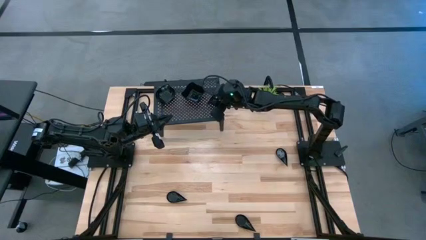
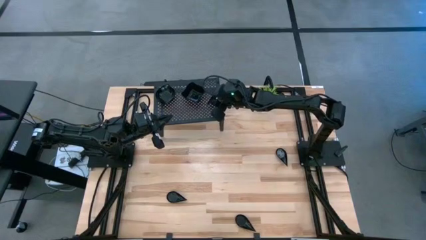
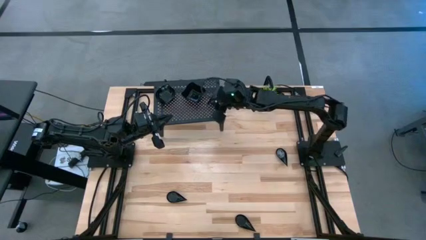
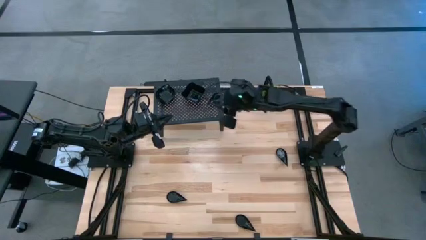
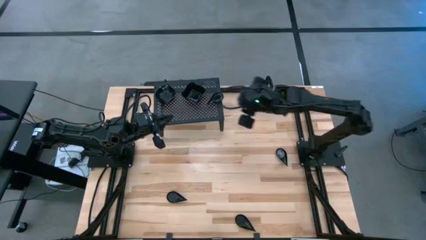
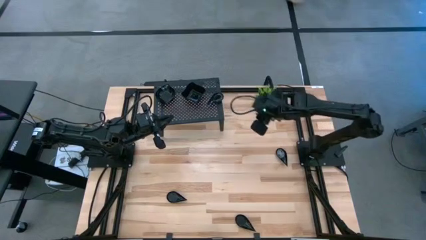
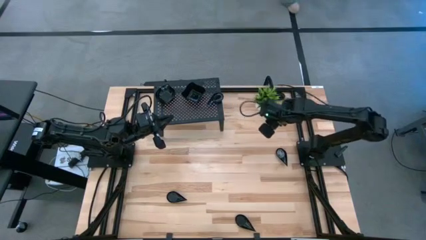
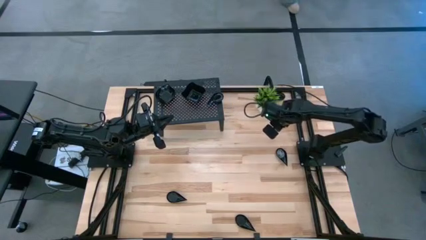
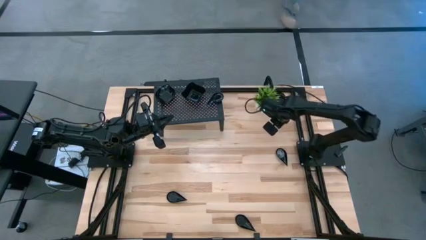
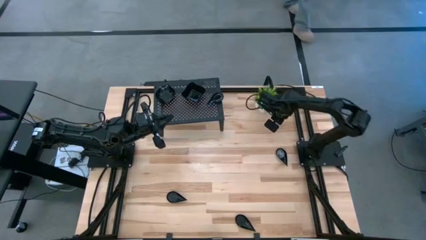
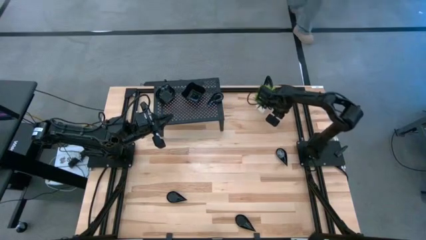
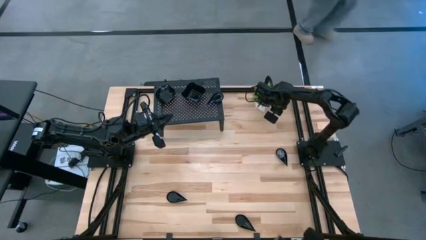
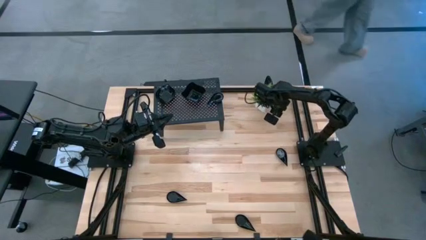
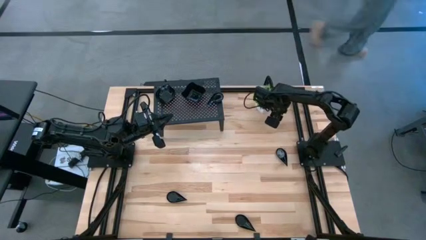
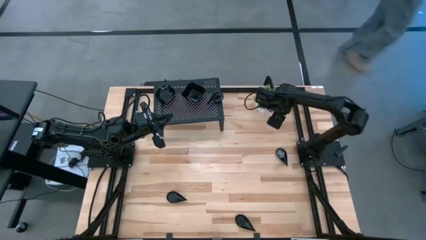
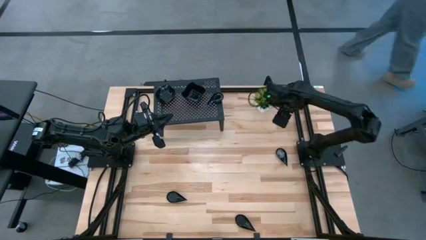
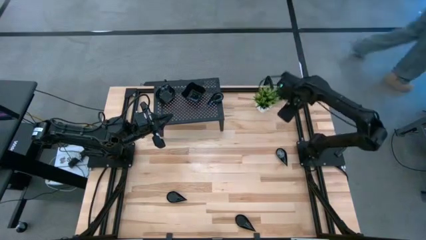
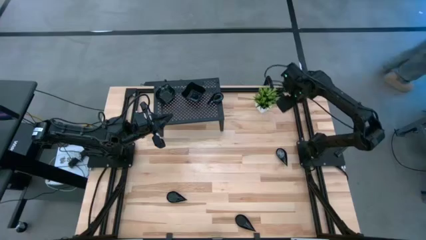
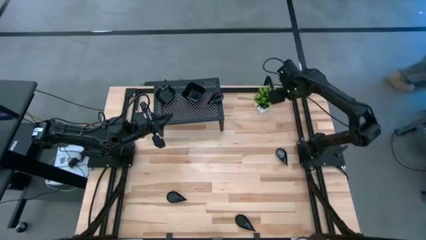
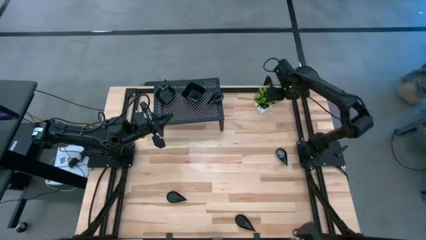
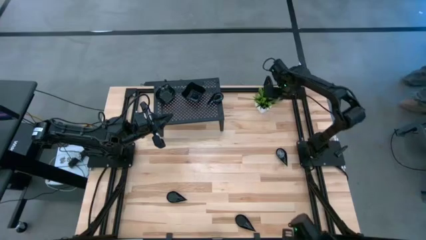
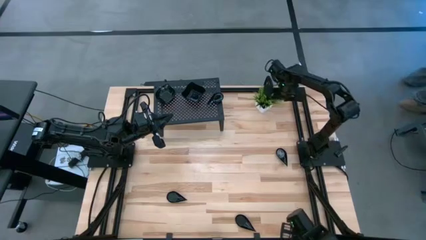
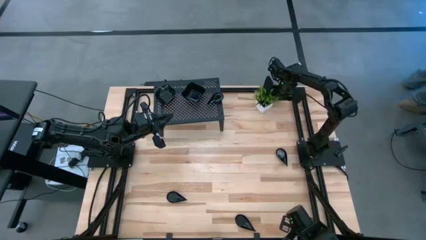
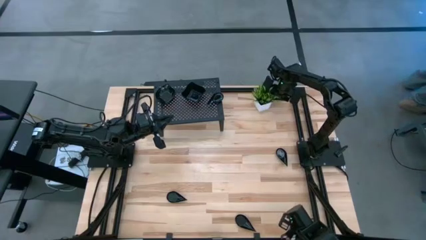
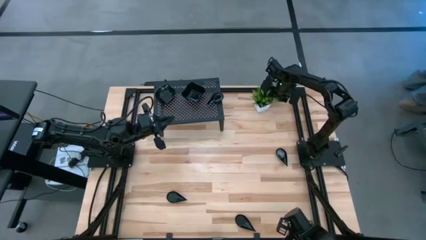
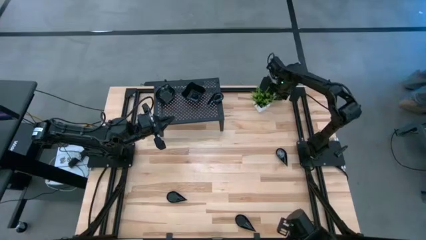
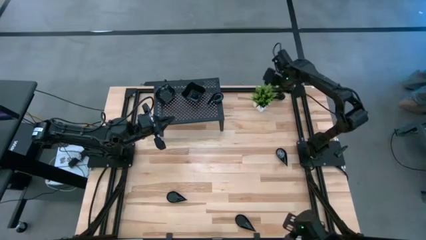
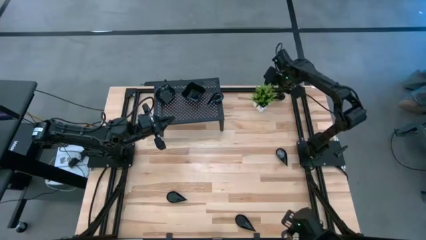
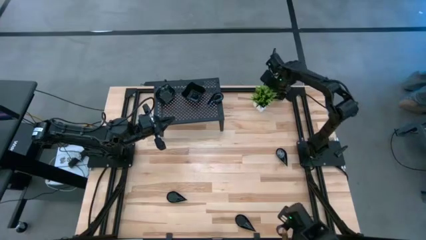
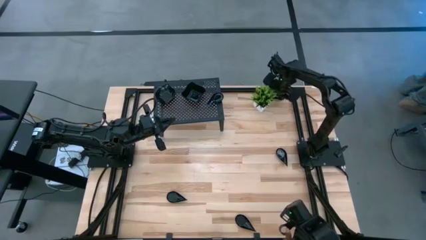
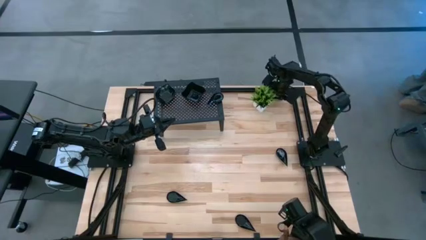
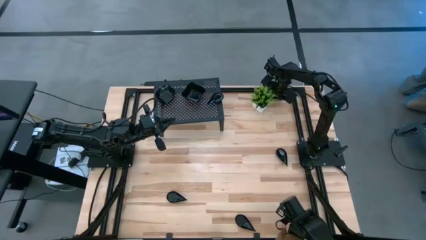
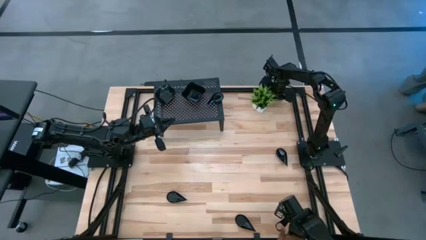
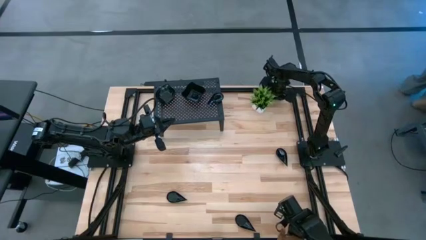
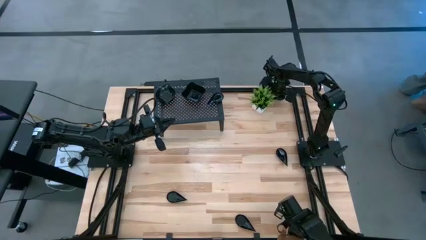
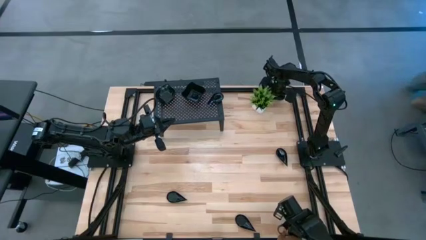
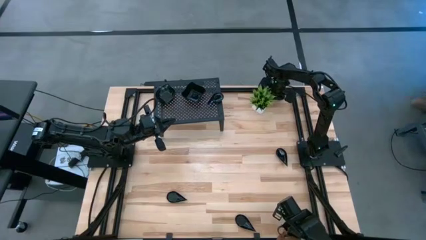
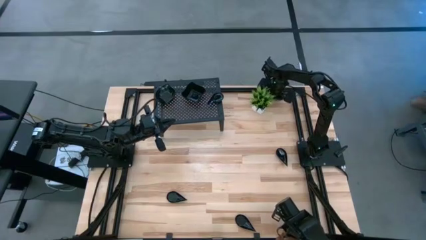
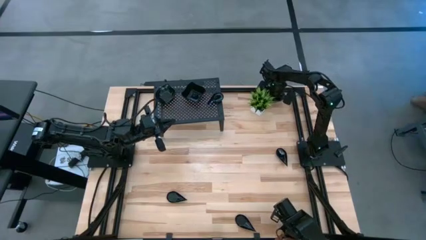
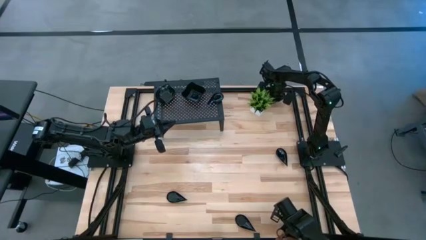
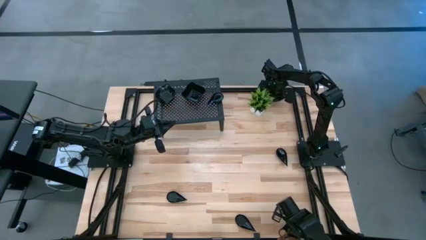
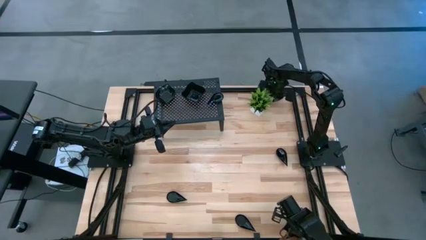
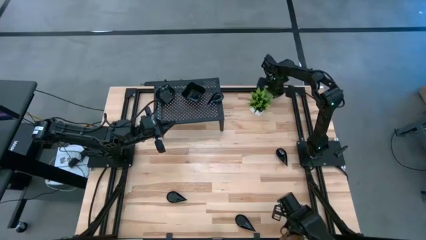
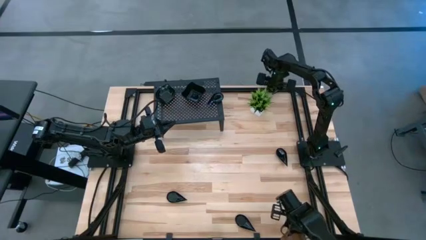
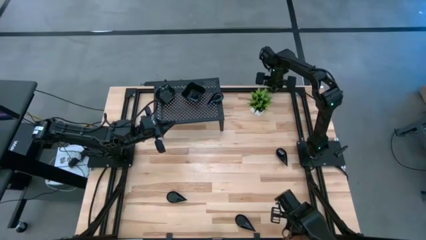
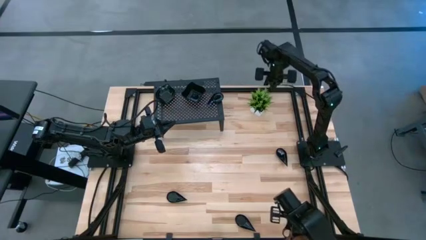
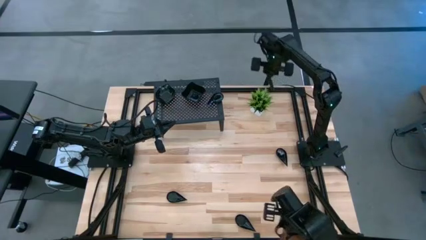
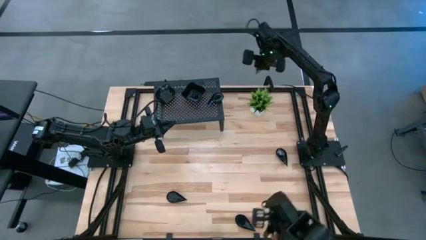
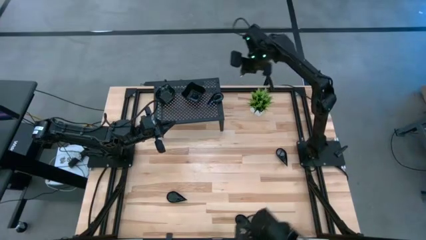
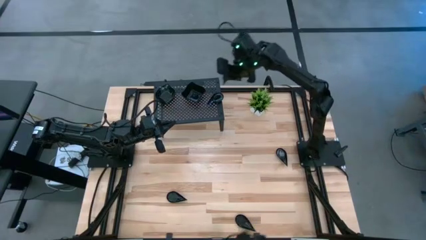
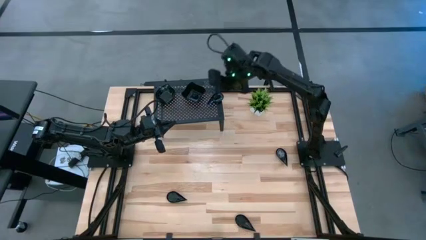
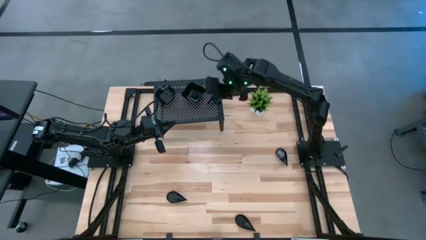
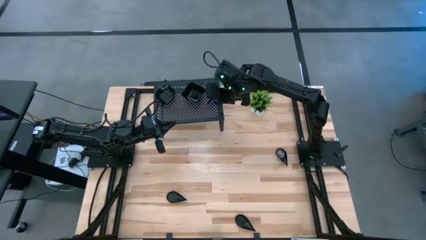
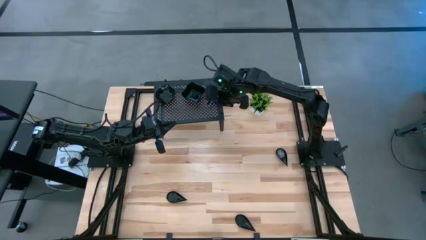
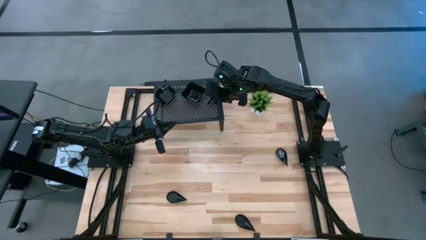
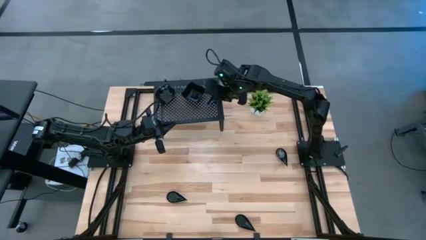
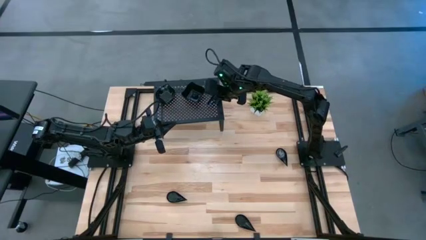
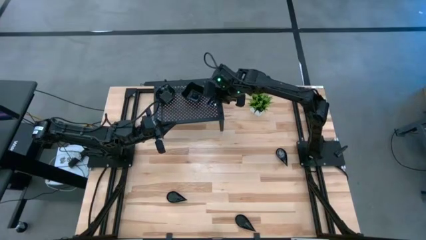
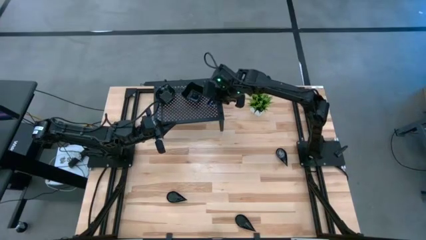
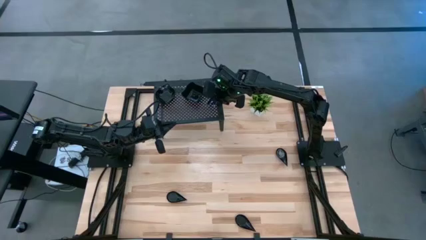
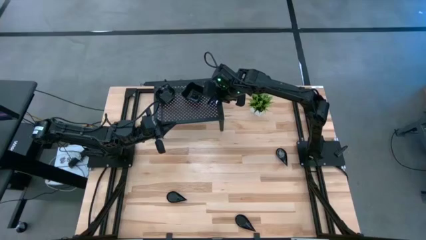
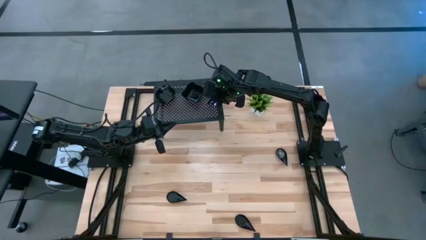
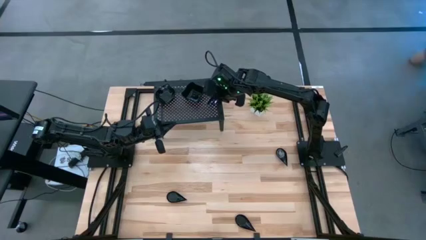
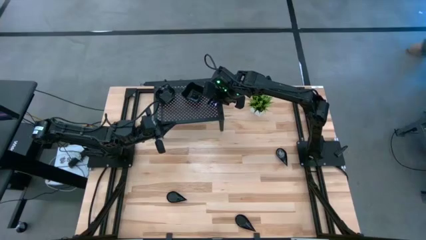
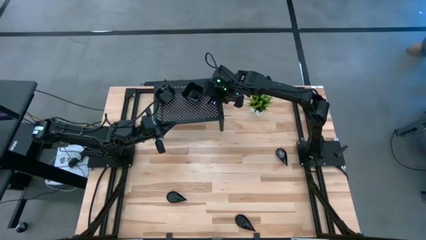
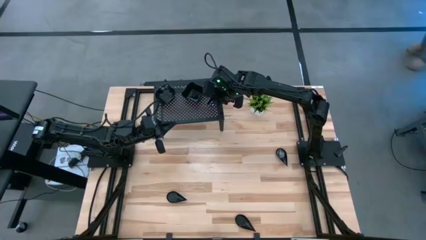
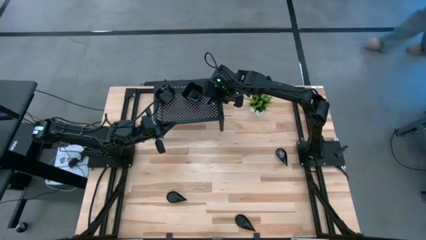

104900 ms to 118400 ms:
Task: Pick & Place Mini shaped plates
Stack the black drop shaped plate on the top of the black drop shaped plate on the shelf
